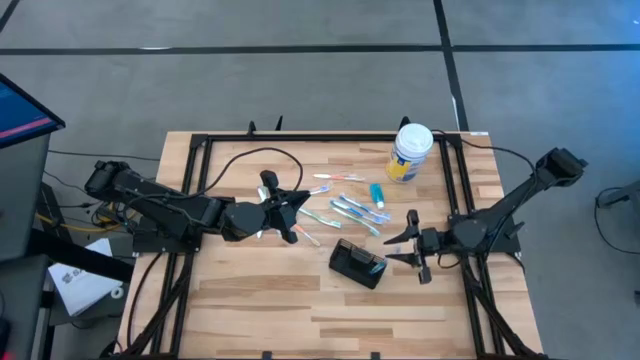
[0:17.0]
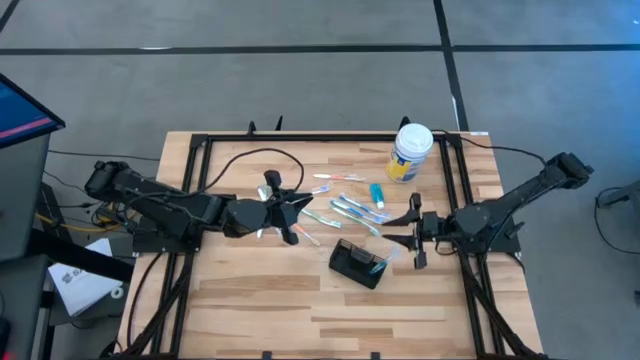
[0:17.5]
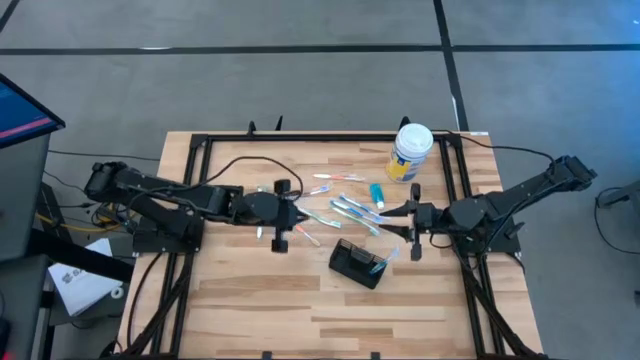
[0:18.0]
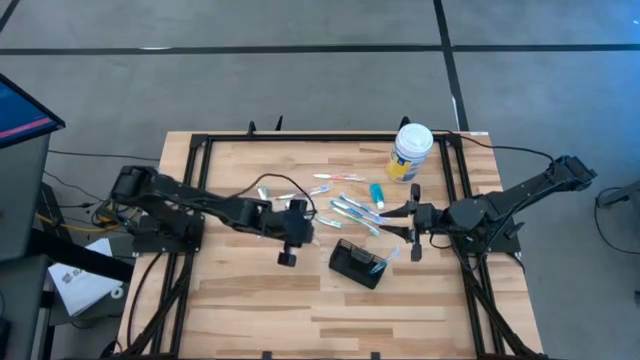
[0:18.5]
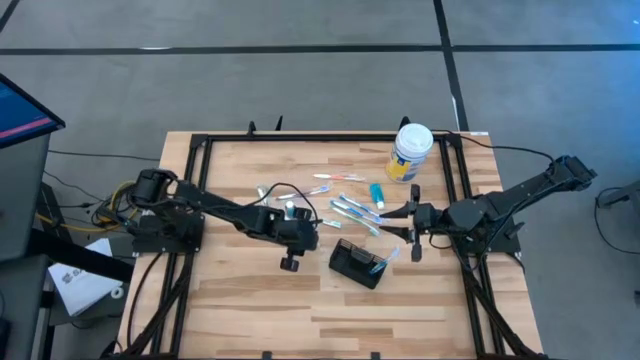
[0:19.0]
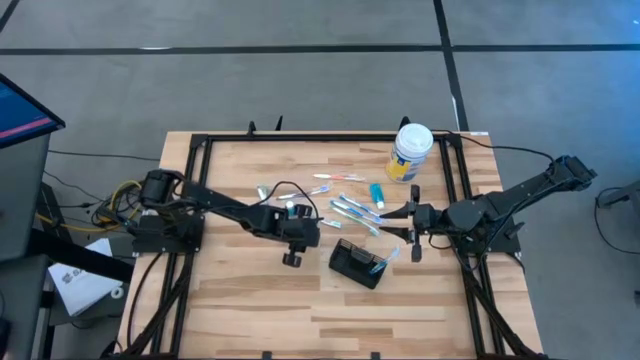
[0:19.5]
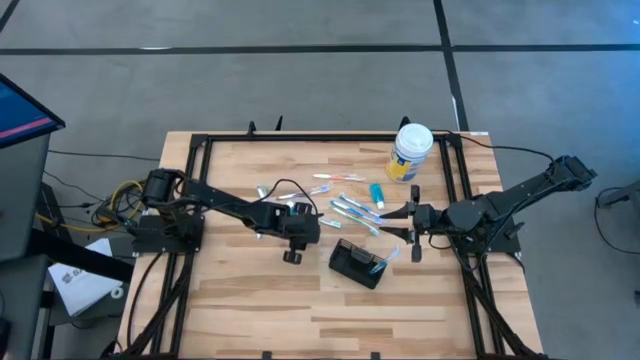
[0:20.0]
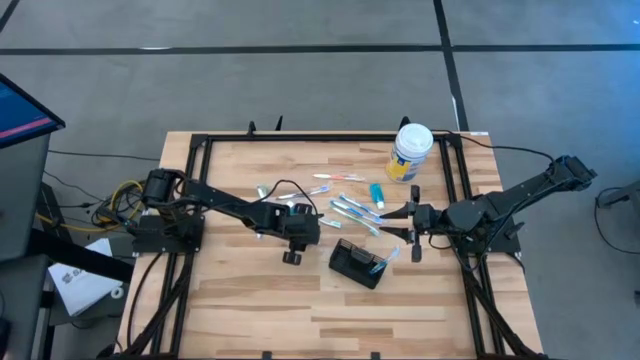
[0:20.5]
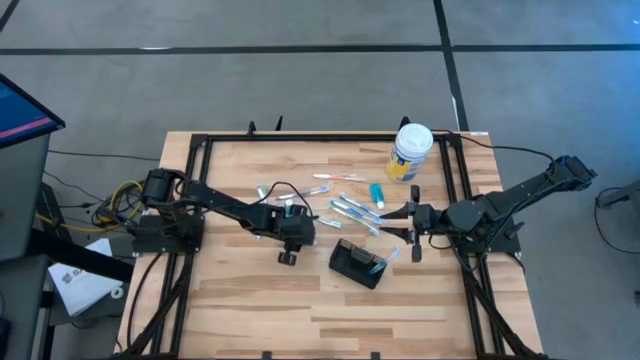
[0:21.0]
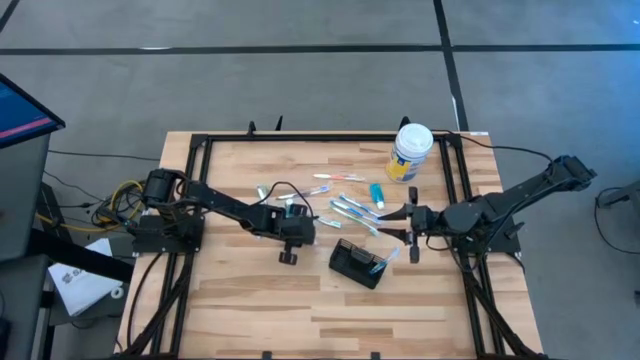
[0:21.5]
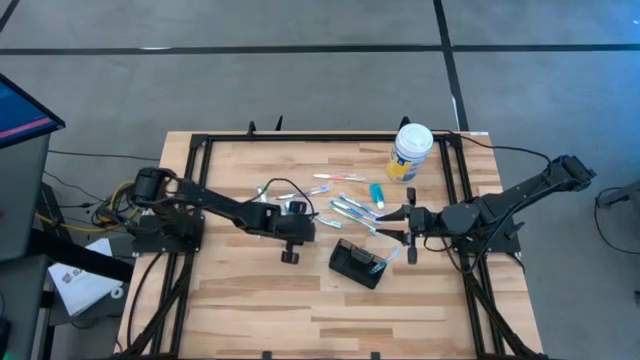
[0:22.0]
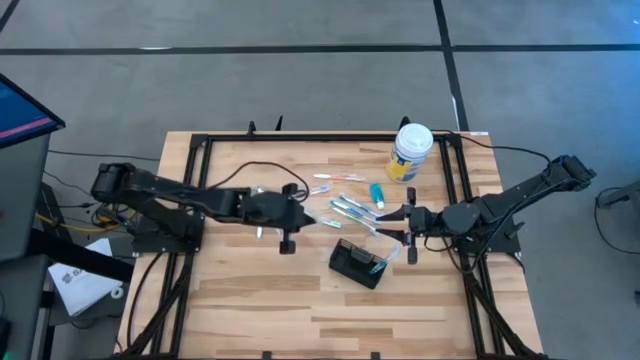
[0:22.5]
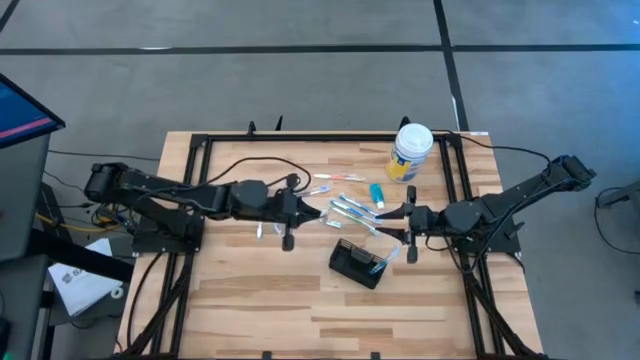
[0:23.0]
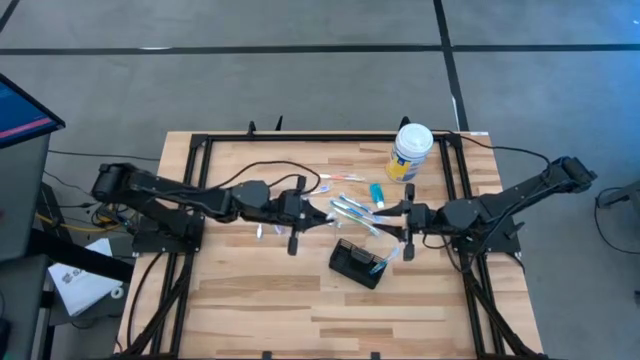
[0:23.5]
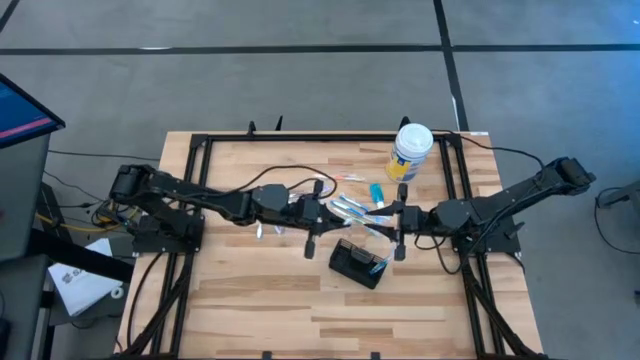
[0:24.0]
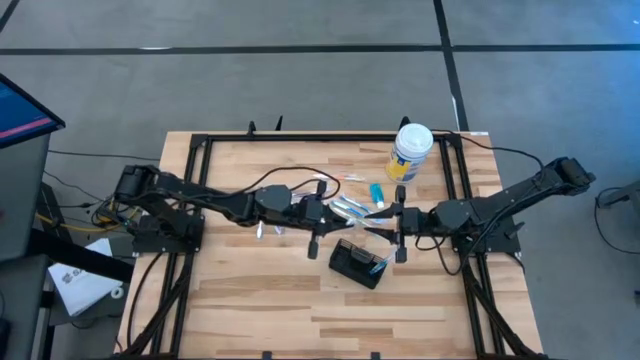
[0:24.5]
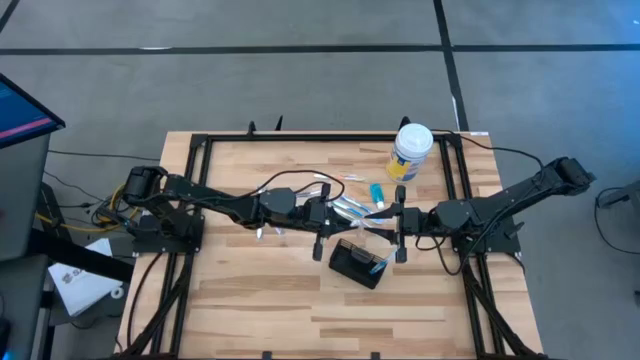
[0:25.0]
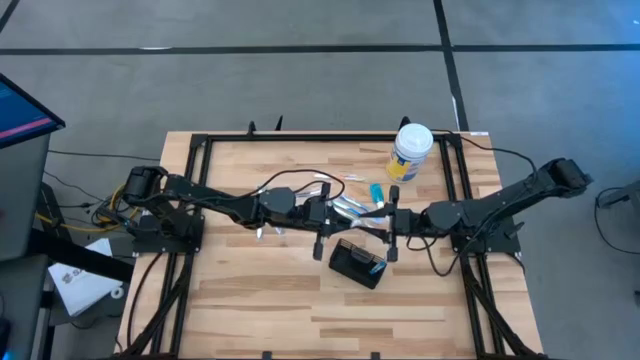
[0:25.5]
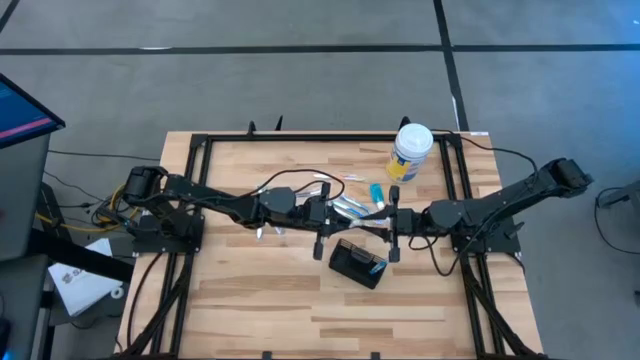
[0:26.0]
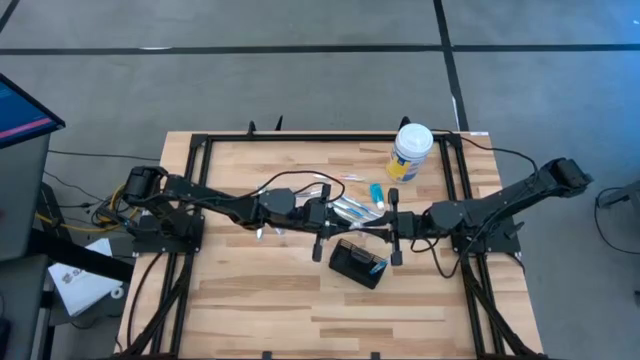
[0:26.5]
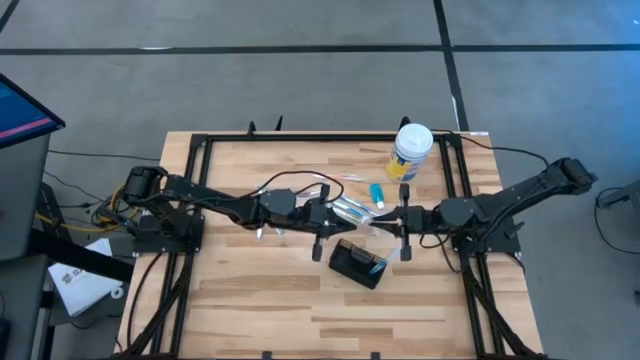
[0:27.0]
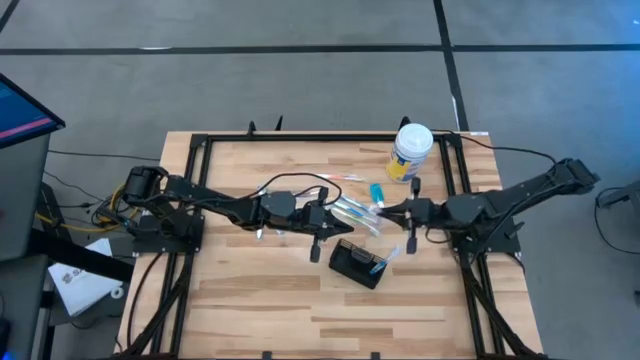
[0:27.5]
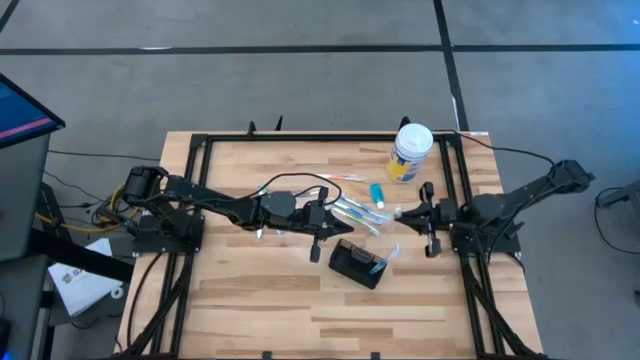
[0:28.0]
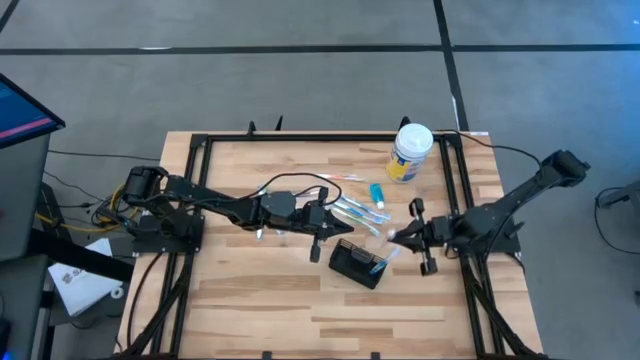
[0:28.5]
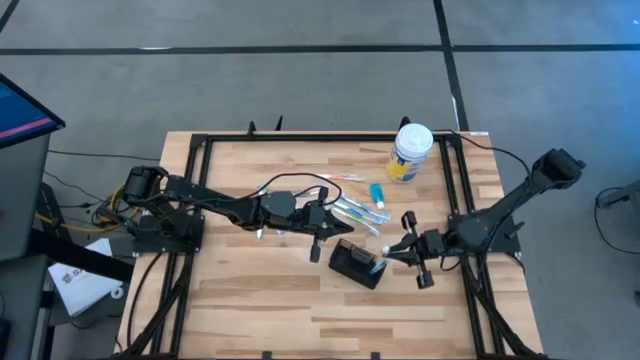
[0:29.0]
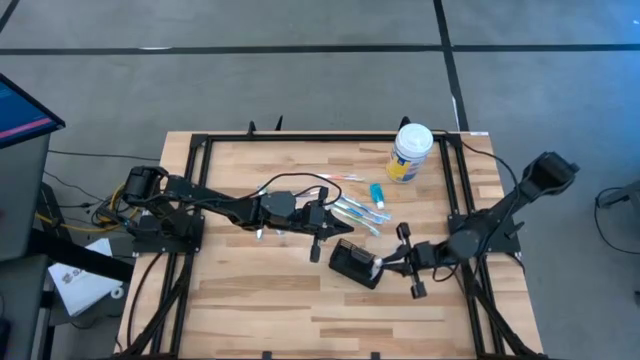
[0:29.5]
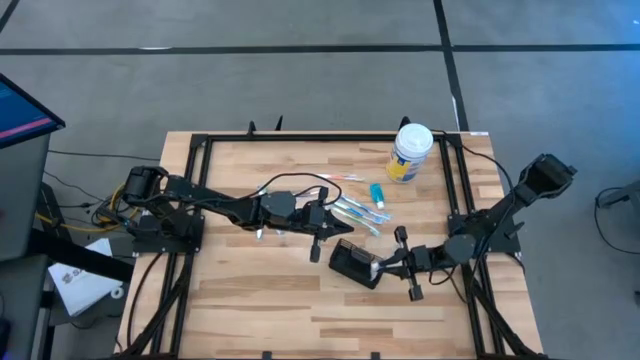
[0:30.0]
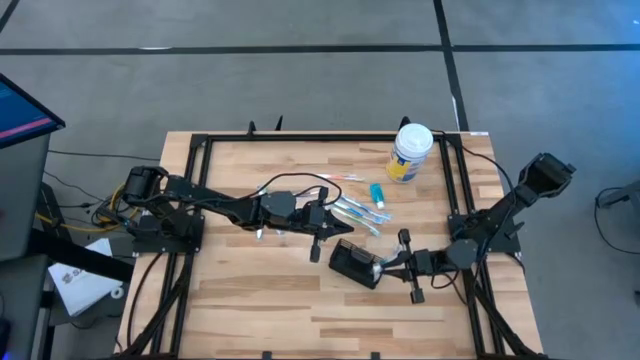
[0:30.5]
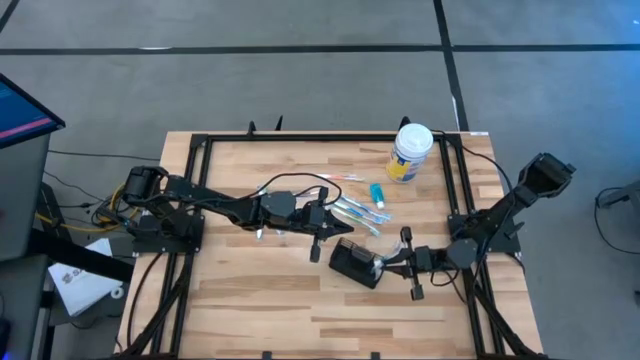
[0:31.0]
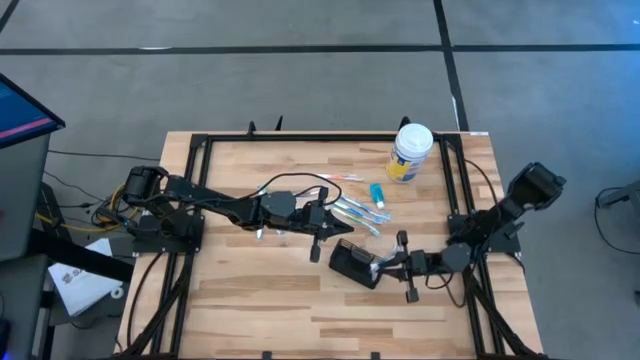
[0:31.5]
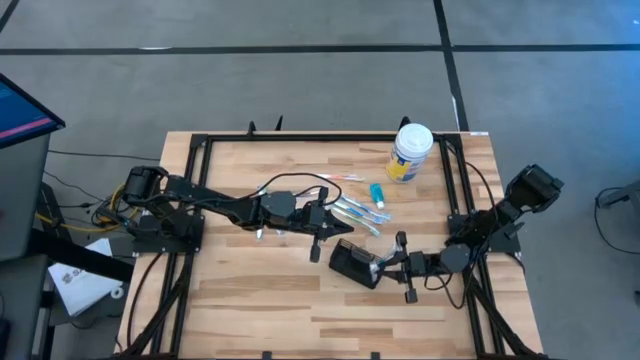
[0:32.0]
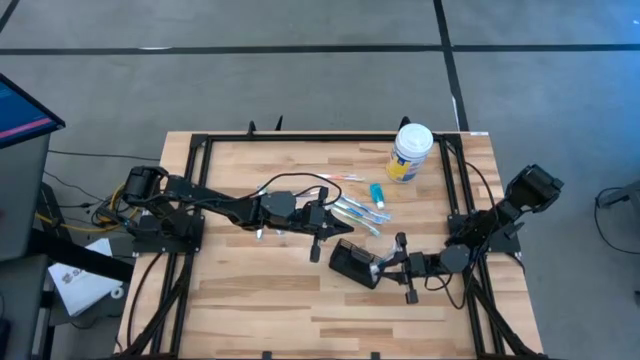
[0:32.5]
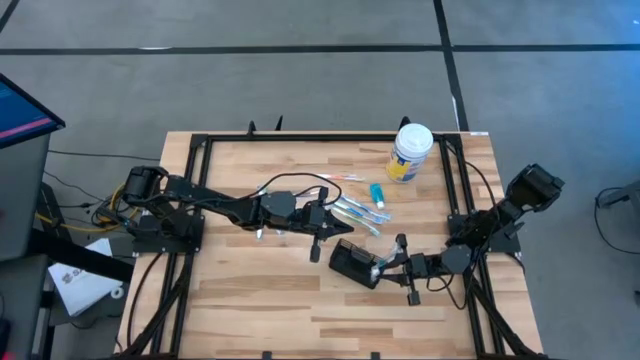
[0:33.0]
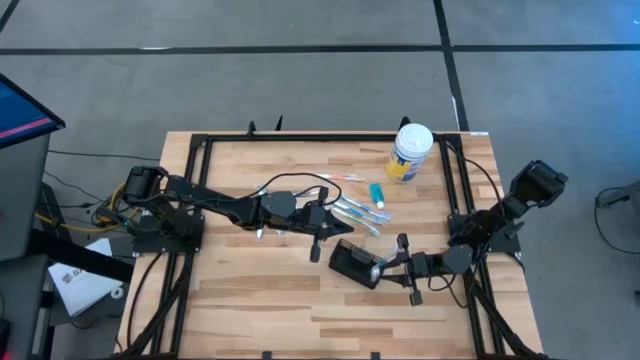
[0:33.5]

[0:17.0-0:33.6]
Task: Pick & Place toothbrushing station
Put the bottom orange toothbrush into the mesh organizer

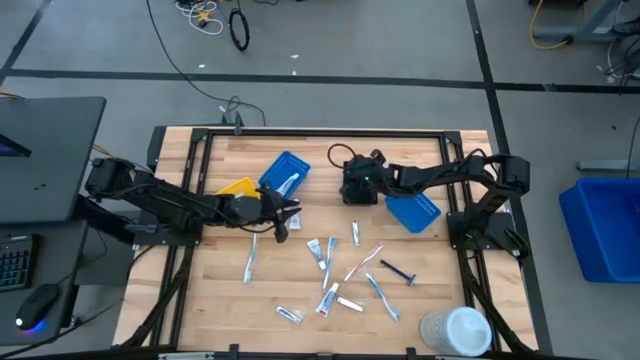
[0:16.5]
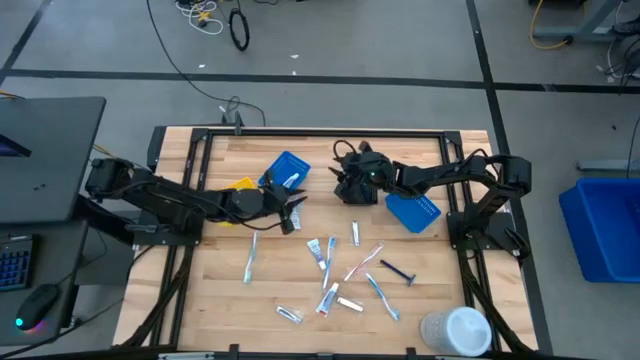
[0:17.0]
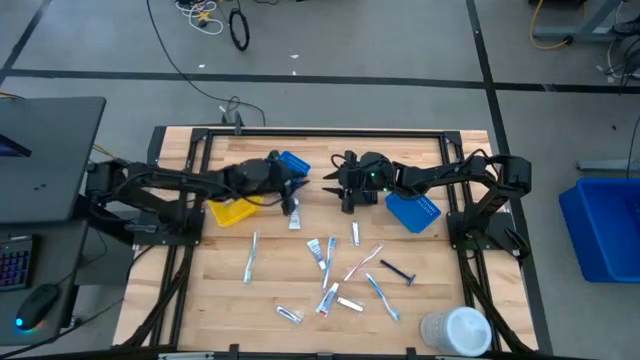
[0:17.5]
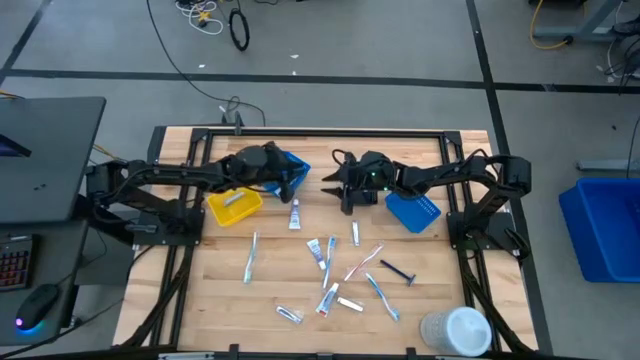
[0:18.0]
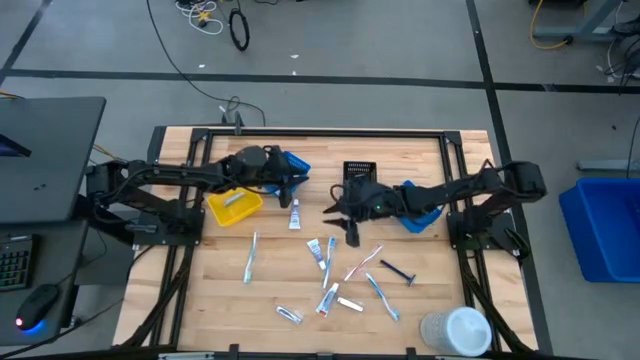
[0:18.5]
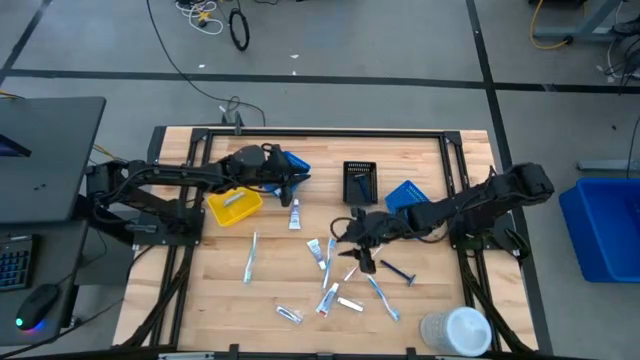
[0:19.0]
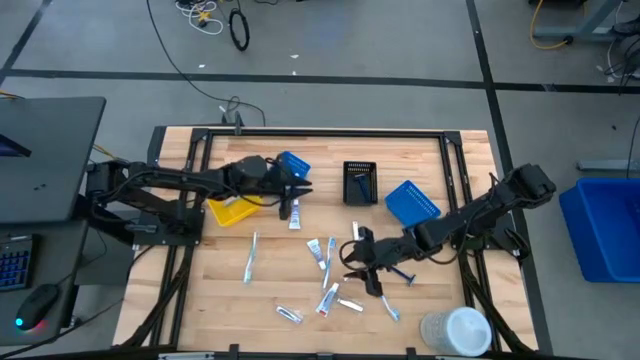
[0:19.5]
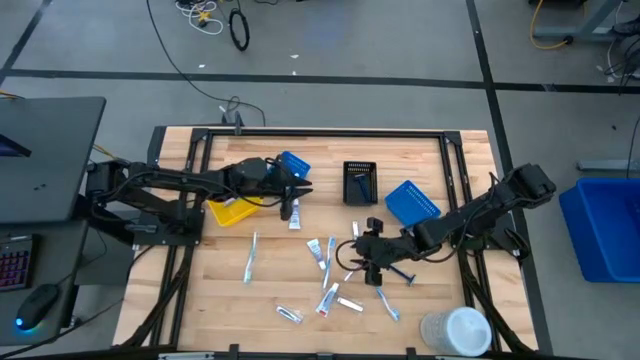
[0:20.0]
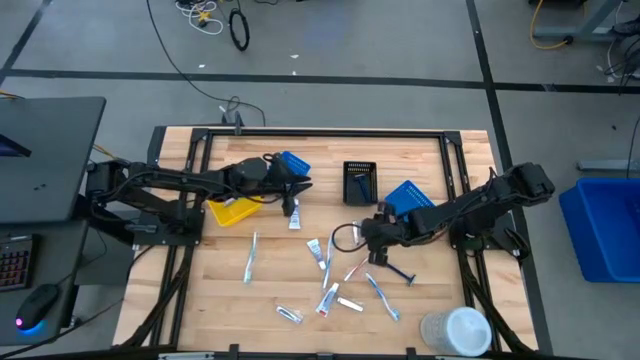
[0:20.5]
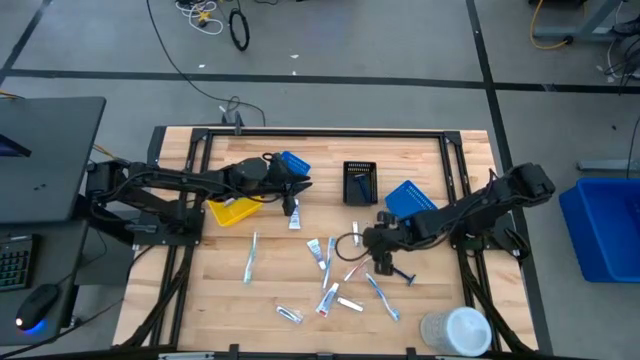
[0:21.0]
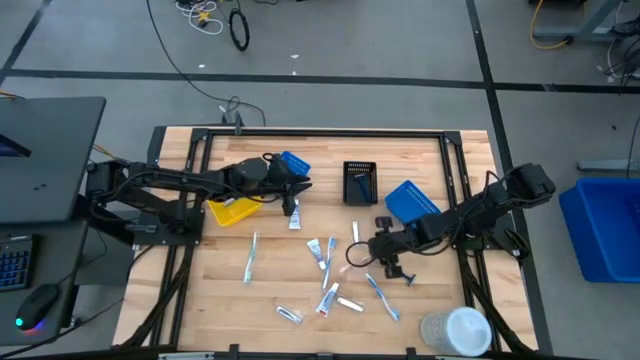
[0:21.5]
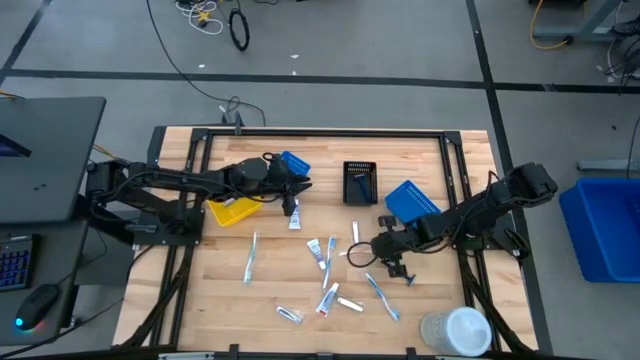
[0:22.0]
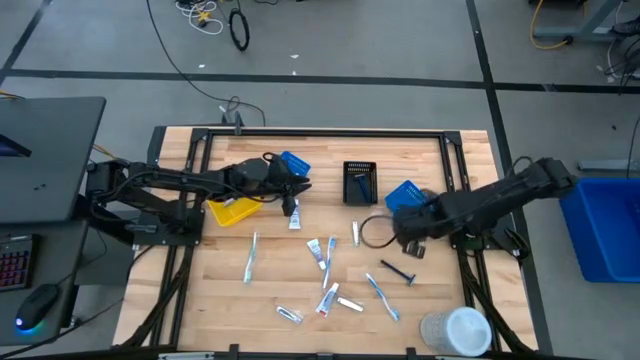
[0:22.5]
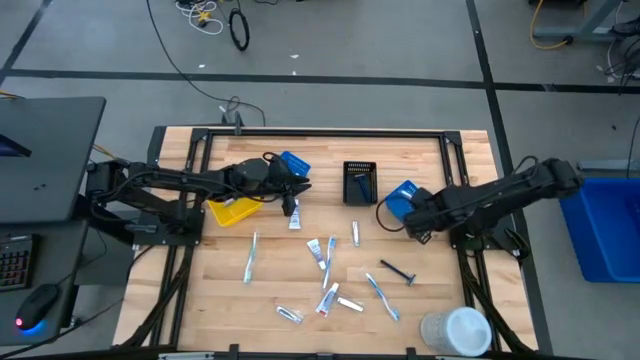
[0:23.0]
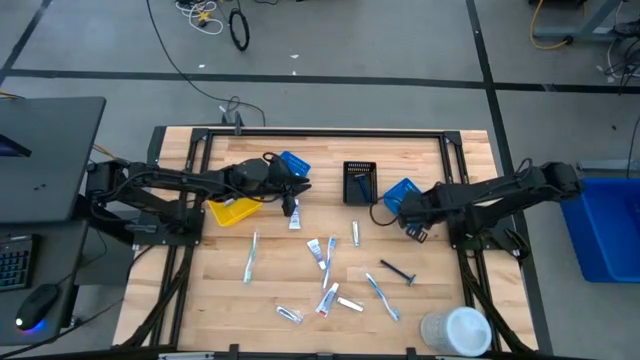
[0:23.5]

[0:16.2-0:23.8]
Task: Pick & Place Travel size toiletries
Put the orange toothbrush into the right blue bin
